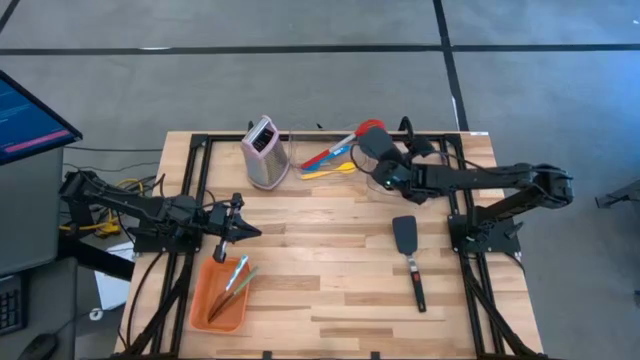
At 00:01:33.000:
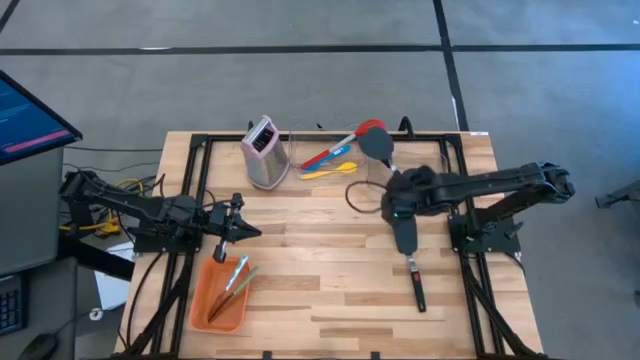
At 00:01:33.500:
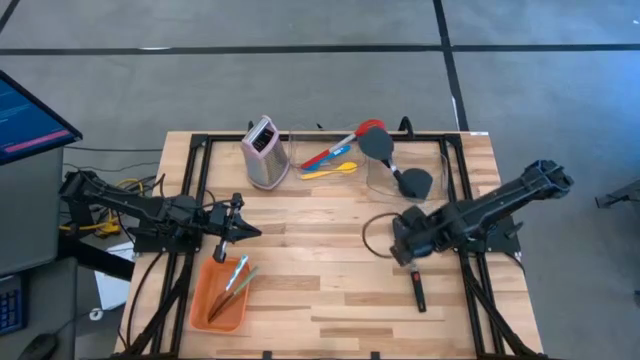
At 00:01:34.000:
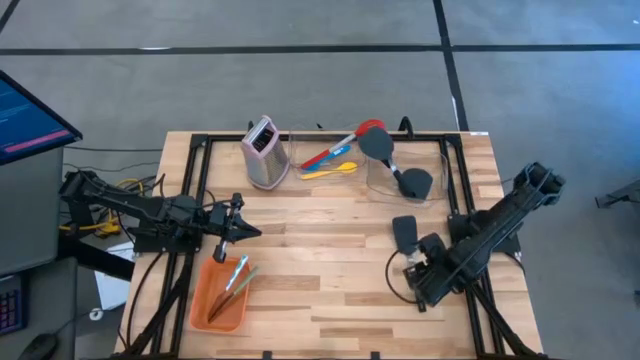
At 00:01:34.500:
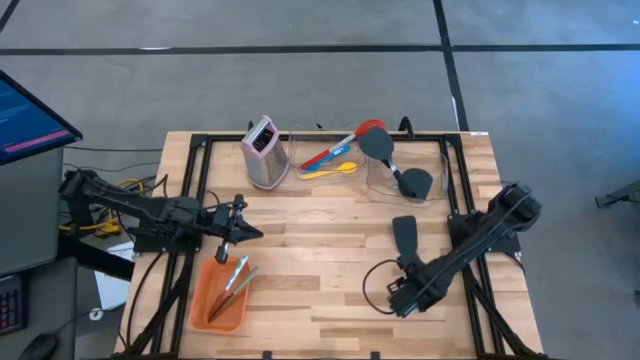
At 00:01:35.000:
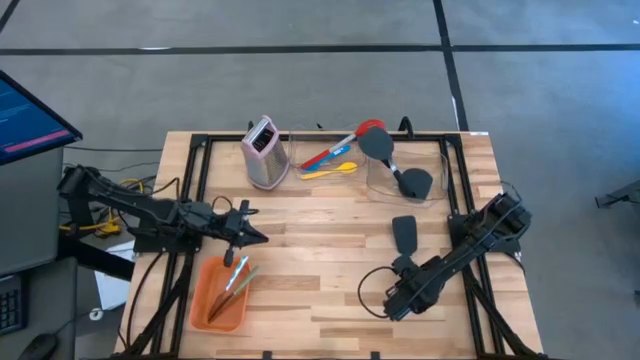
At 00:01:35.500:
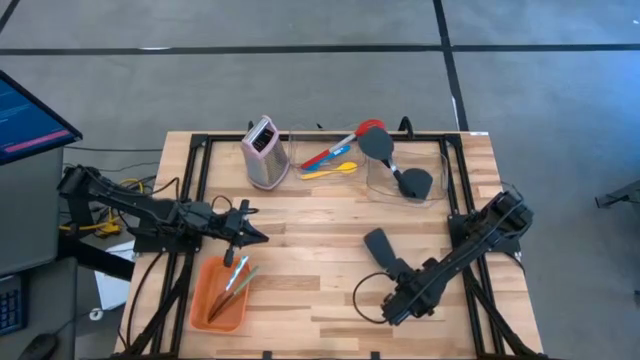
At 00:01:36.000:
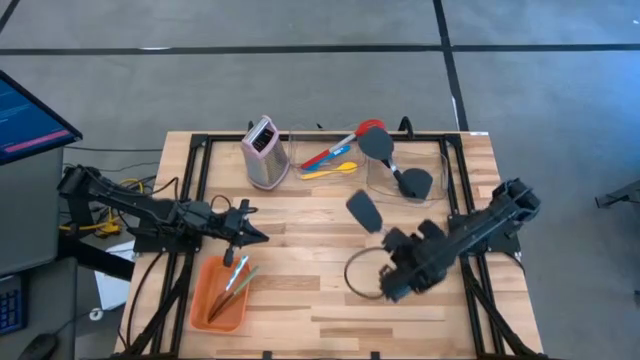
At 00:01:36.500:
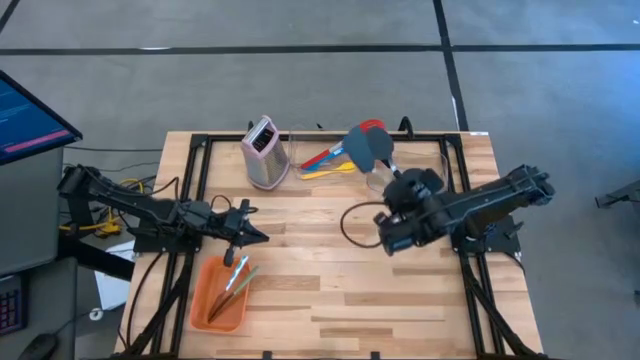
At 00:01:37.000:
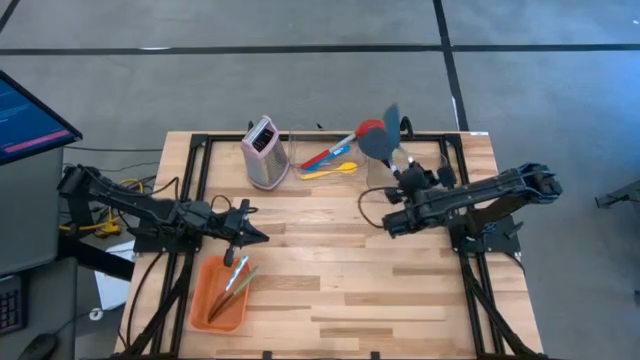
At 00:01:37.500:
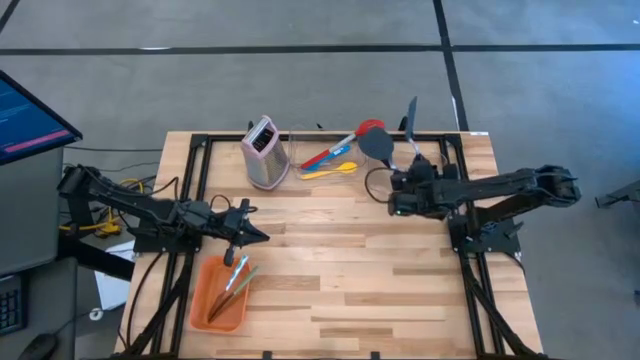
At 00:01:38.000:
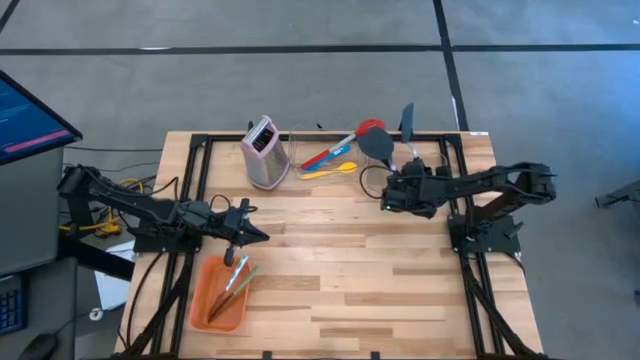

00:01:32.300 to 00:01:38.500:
Task: Pick & Place Kitchen Items
Put the black spatula into the right transparent bin

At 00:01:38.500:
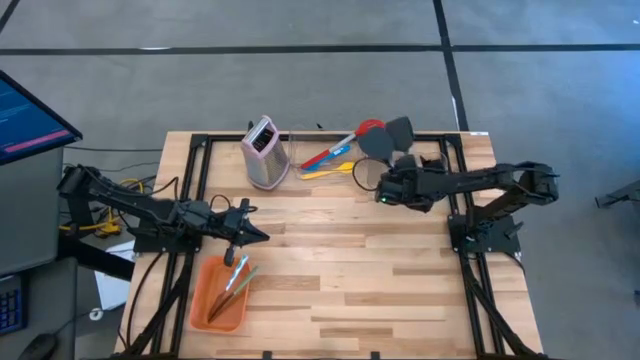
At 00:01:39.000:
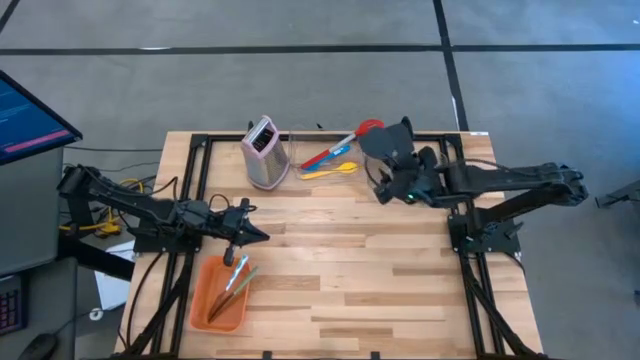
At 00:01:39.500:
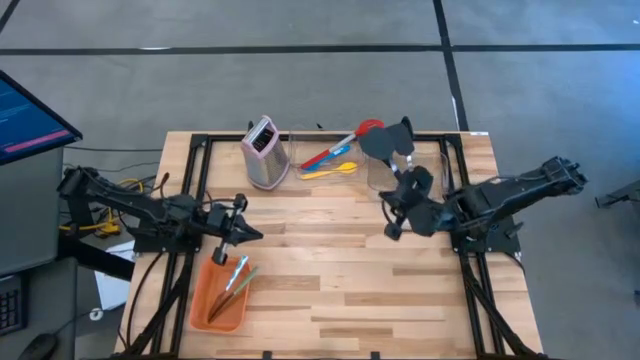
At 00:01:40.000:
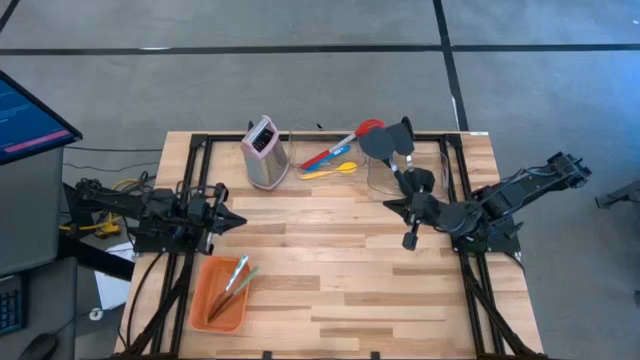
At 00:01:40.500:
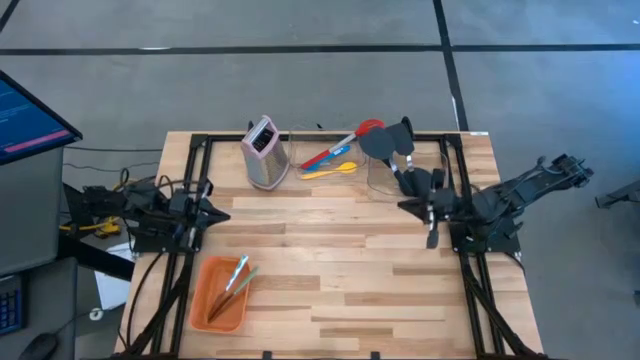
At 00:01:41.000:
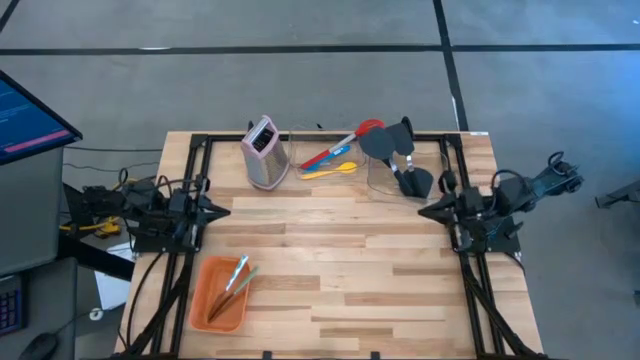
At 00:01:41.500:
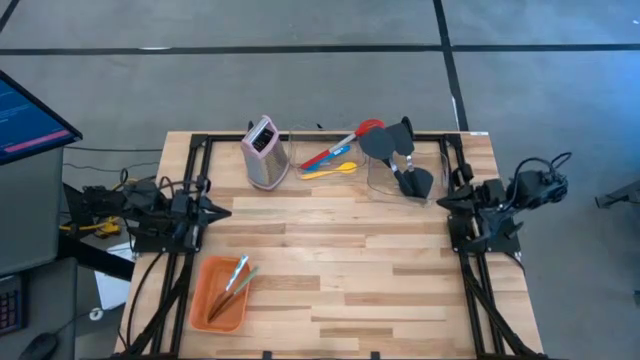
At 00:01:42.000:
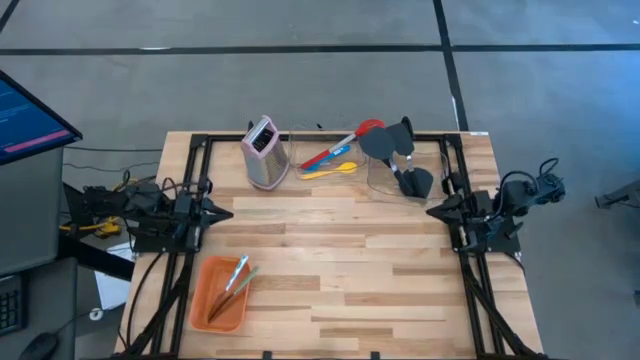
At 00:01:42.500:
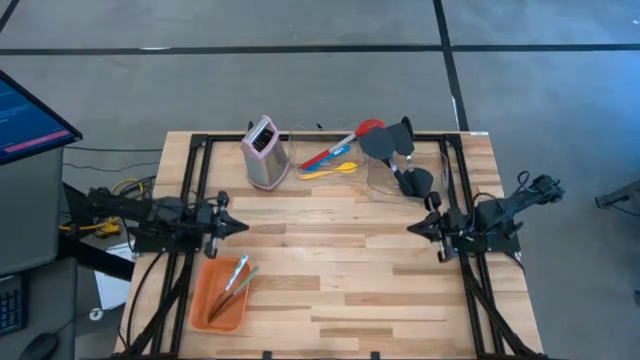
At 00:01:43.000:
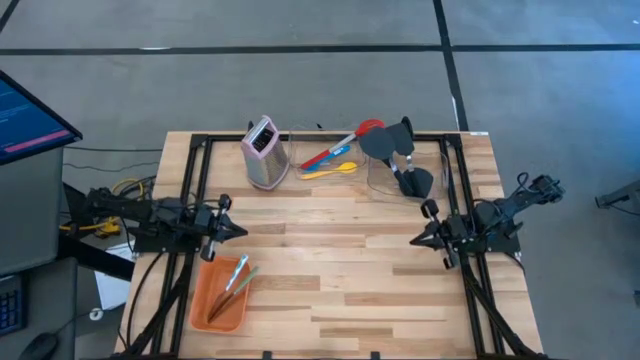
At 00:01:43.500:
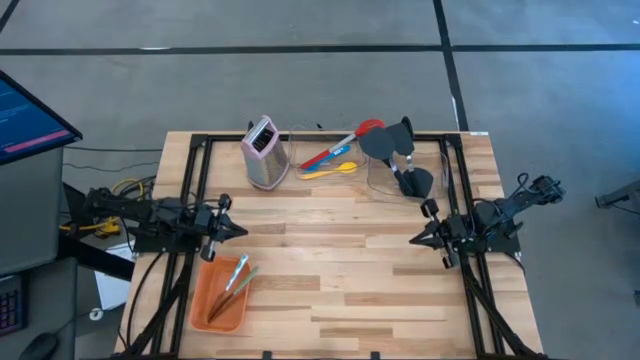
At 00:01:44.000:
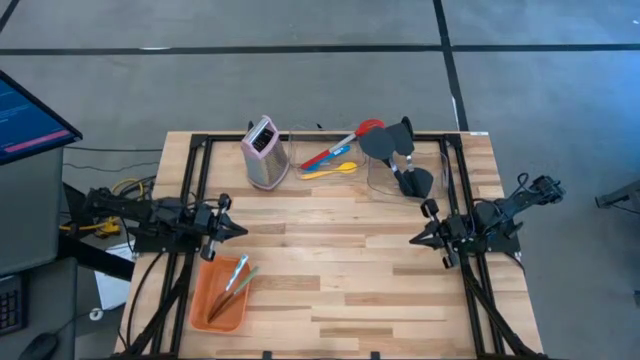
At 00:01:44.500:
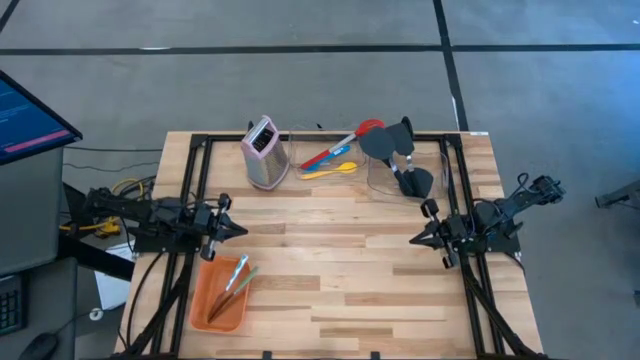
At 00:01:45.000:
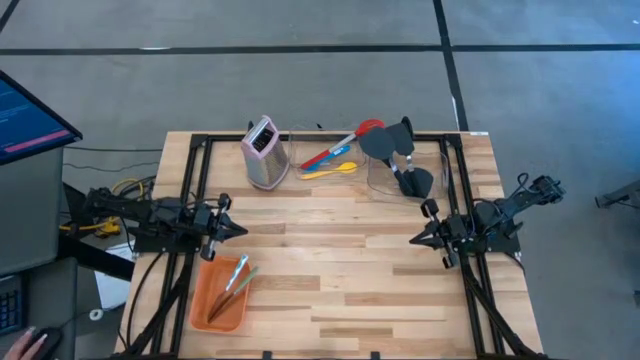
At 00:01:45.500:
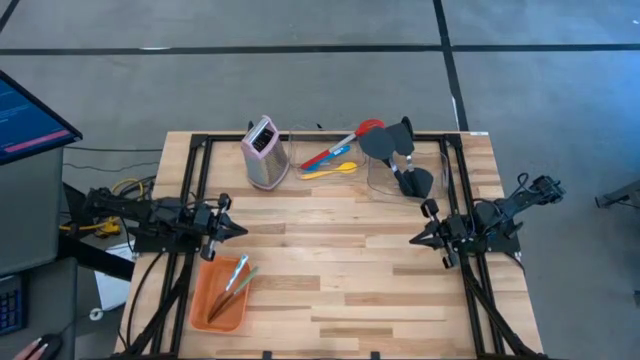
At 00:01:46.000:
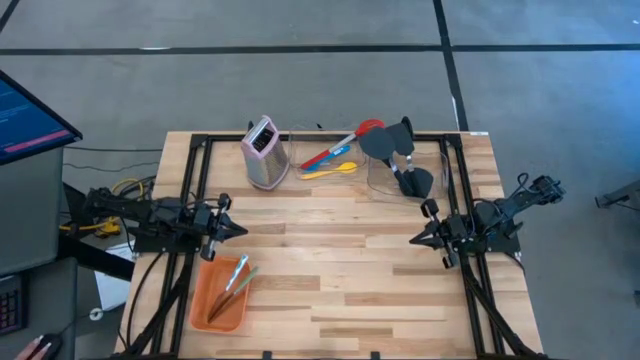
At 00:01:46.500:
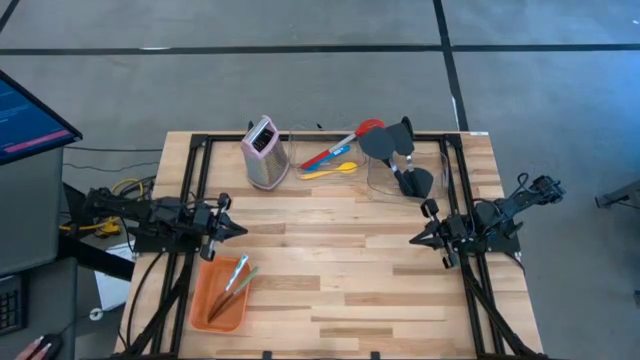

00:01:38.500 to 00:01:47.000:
Return to Home Position

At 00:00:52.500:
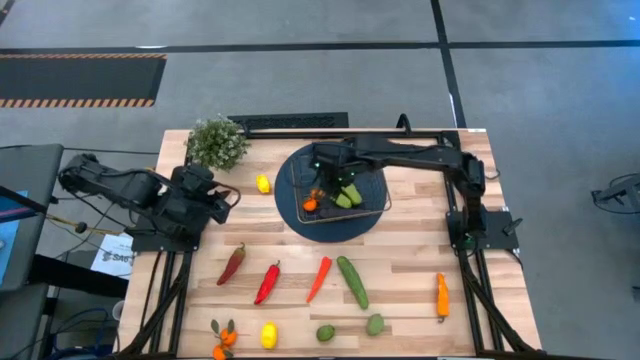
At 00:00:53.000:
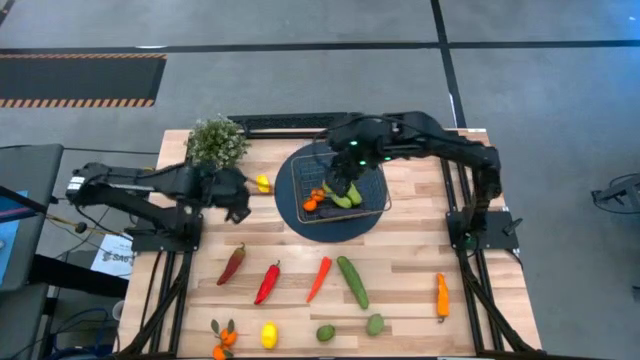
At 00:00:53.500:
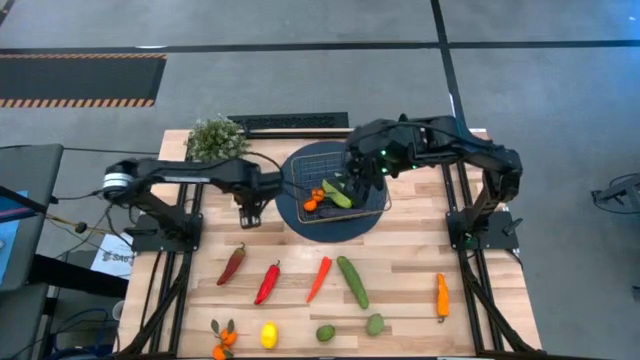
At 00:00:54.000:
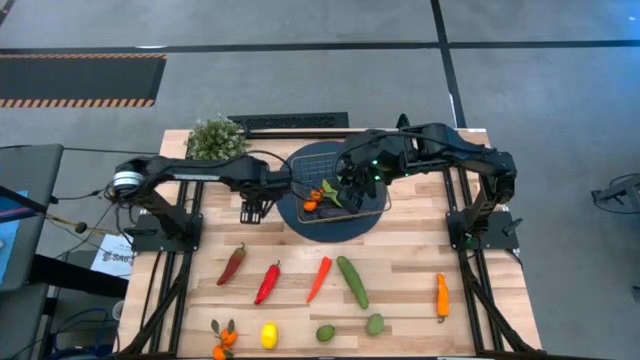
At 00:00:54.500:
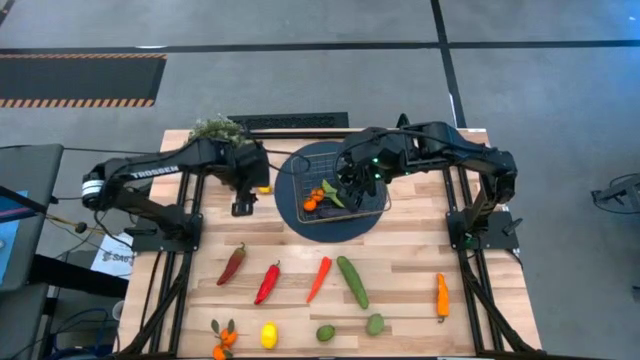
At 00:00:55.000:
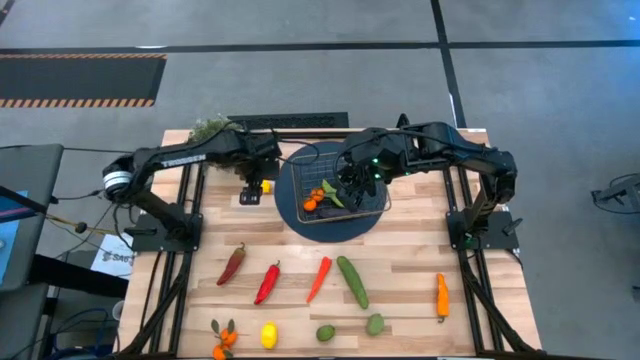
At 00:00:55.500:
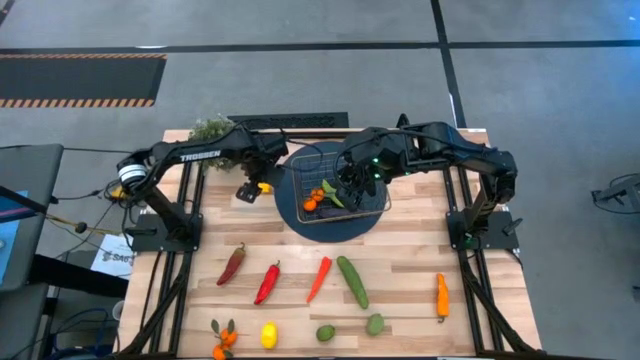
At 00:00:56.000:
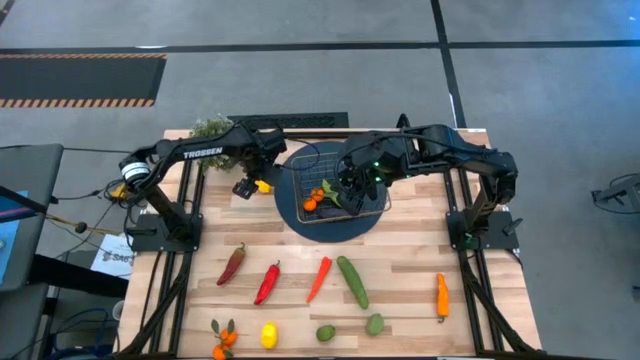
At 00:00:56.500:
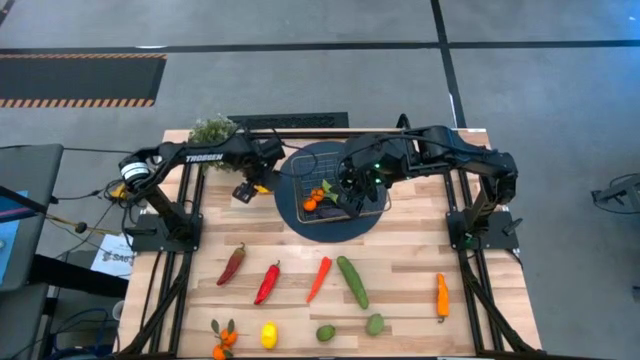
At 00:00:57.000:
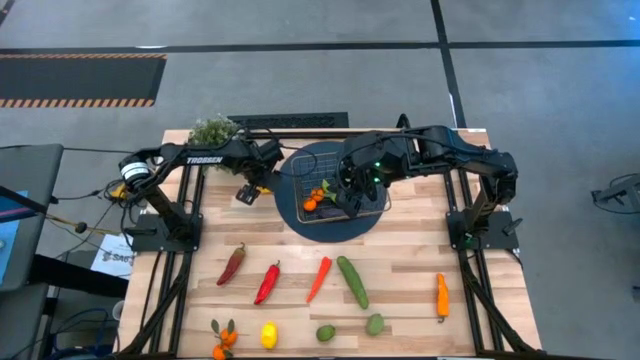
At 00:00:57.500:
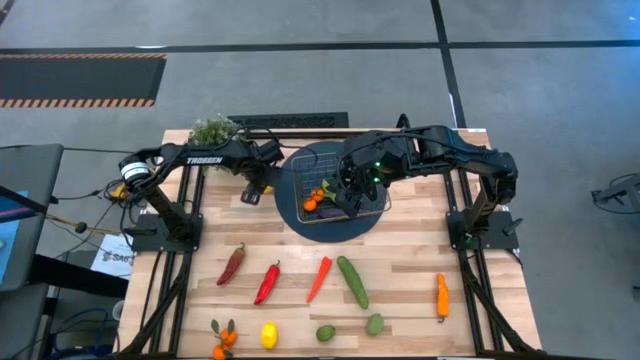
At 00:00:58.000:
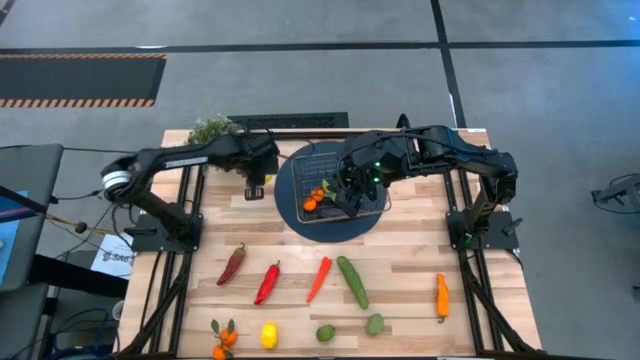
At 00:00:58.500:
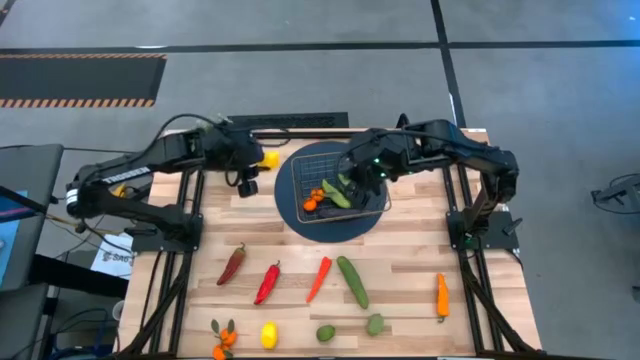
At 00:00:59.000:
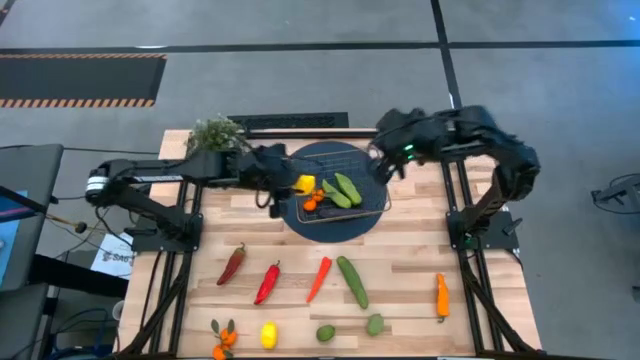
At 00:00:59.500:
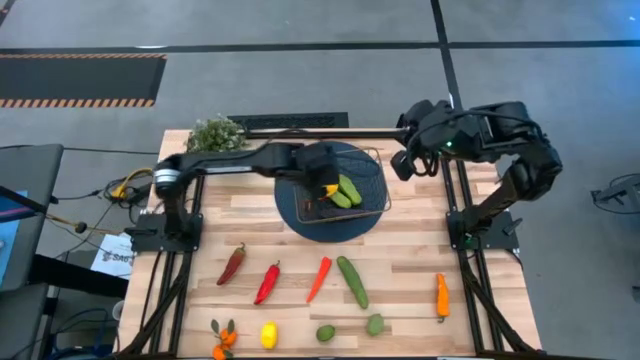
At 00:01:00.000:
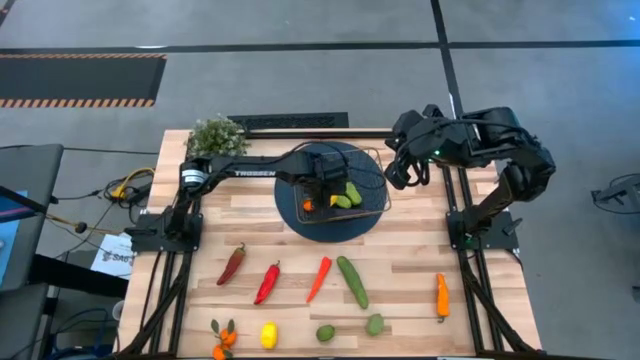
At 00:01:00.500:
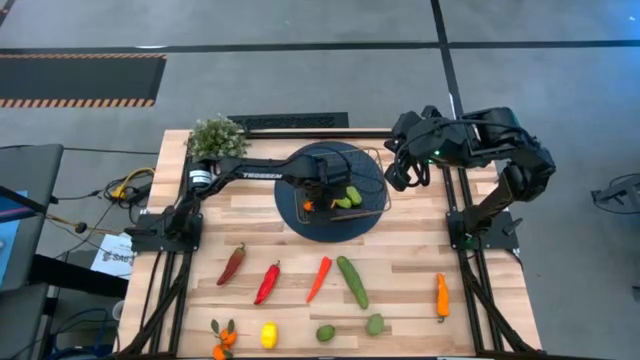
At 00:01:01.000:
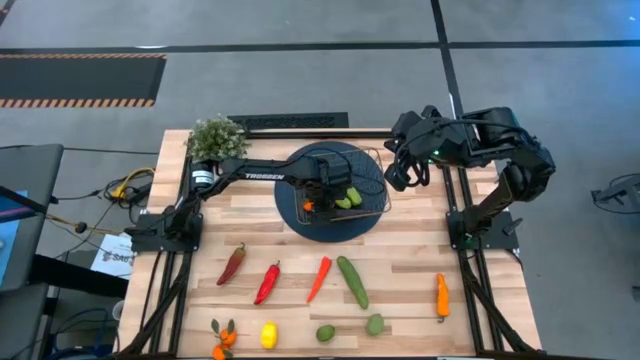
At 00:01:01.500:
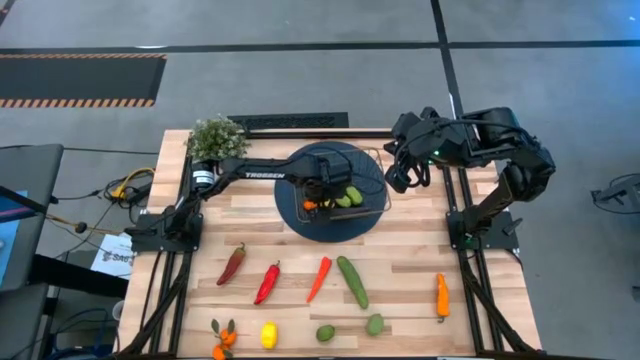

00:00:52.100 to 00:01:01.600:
Task: Build produce basket
Put the top yellow lemon into the basket
